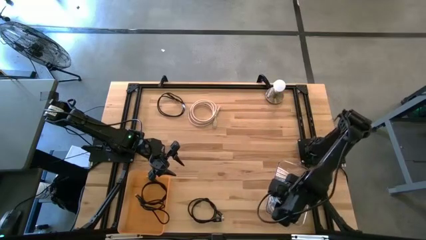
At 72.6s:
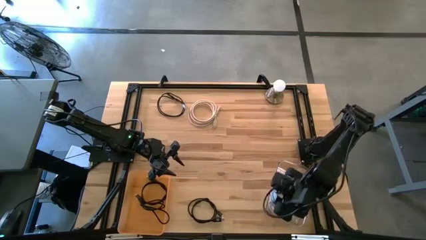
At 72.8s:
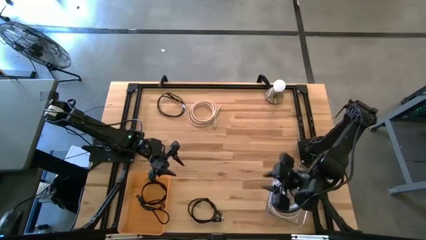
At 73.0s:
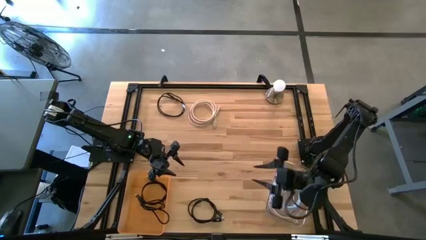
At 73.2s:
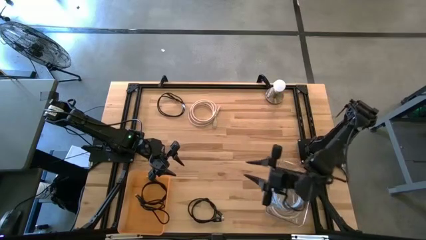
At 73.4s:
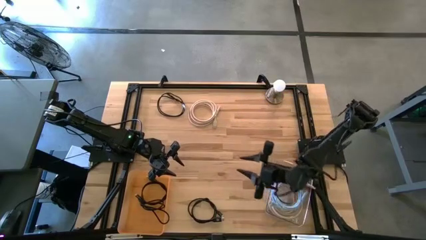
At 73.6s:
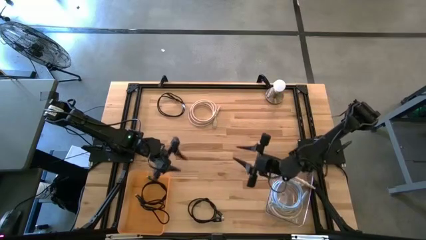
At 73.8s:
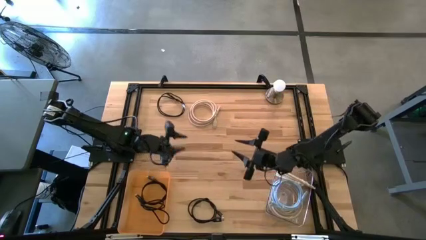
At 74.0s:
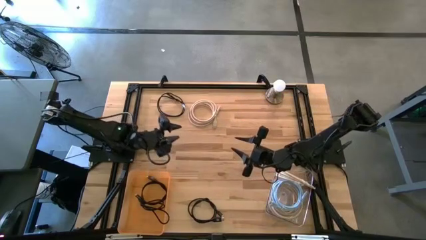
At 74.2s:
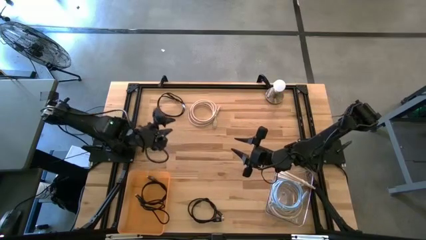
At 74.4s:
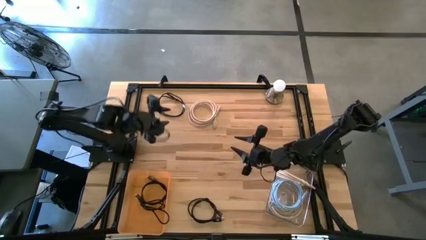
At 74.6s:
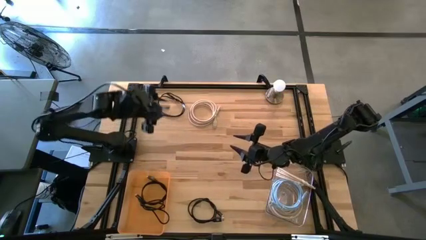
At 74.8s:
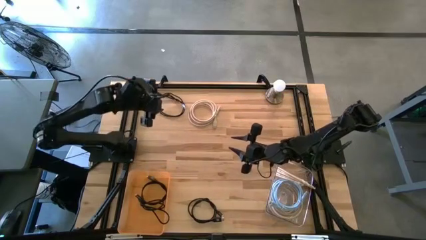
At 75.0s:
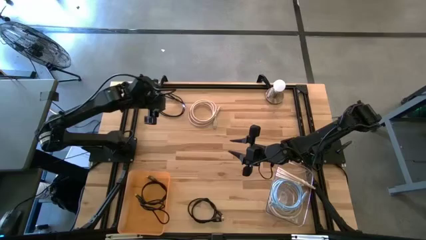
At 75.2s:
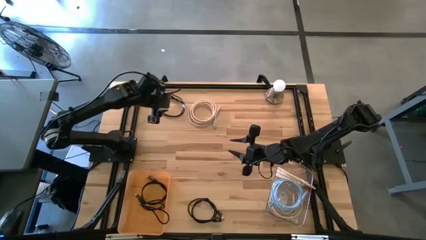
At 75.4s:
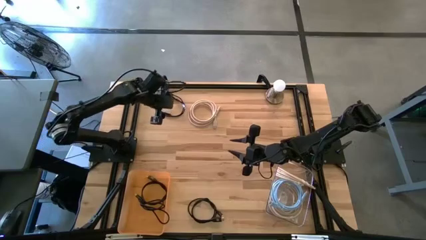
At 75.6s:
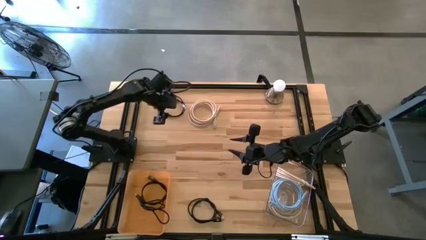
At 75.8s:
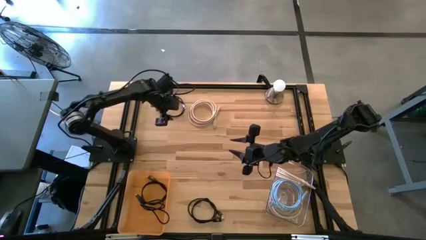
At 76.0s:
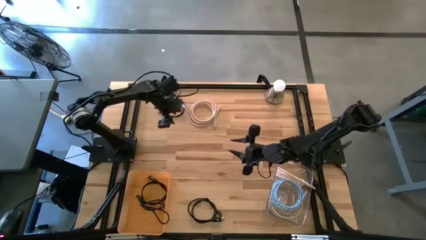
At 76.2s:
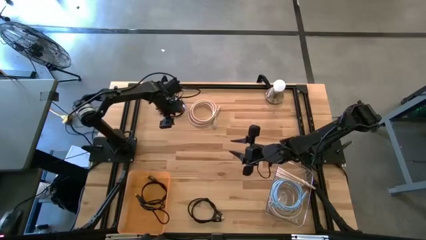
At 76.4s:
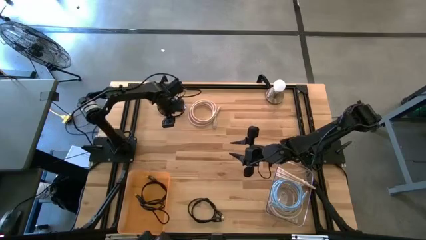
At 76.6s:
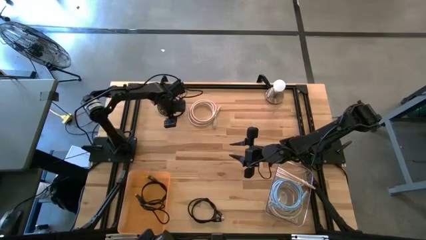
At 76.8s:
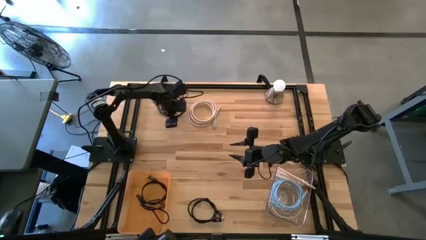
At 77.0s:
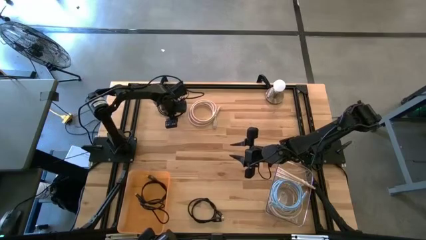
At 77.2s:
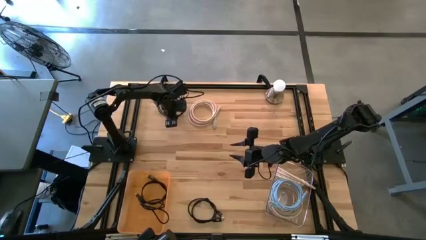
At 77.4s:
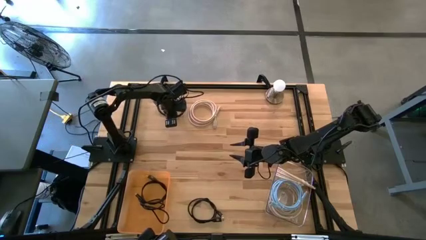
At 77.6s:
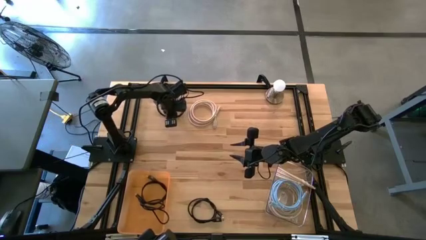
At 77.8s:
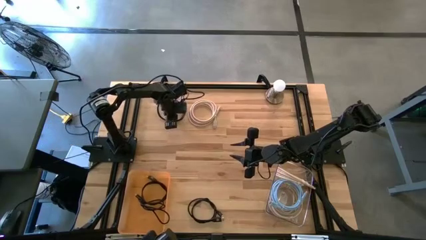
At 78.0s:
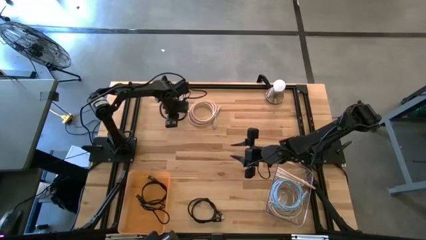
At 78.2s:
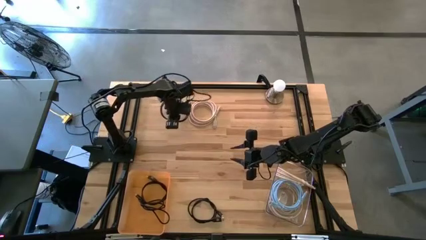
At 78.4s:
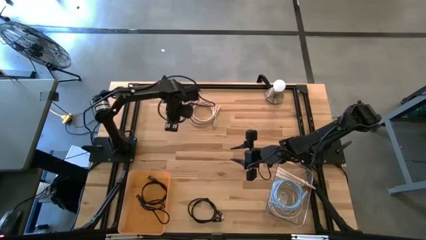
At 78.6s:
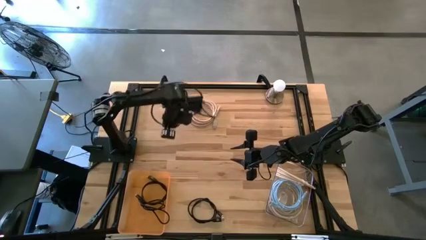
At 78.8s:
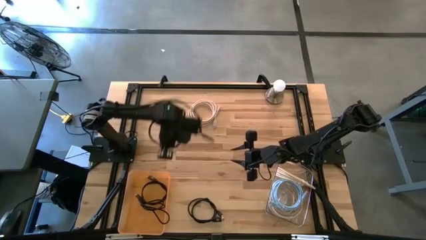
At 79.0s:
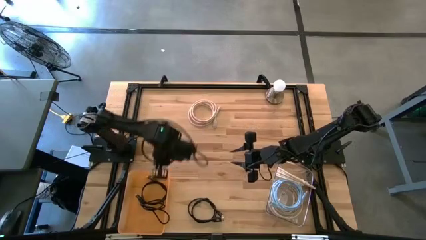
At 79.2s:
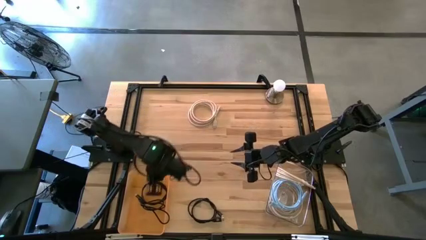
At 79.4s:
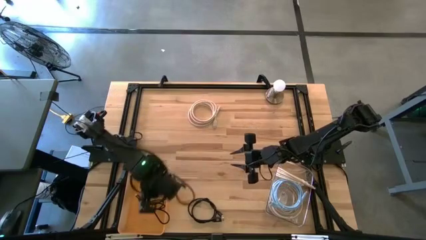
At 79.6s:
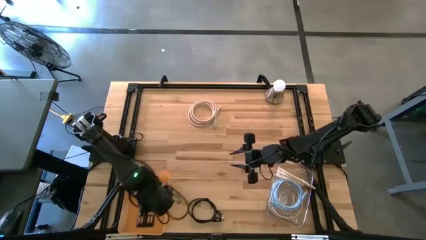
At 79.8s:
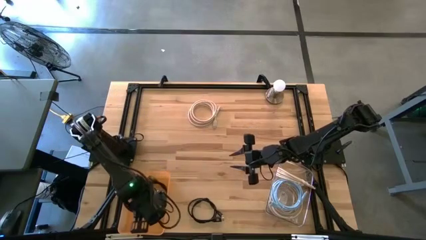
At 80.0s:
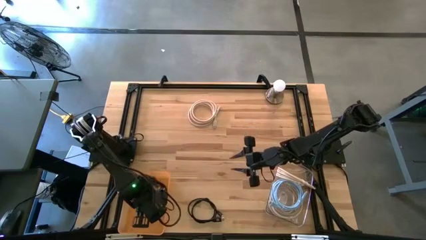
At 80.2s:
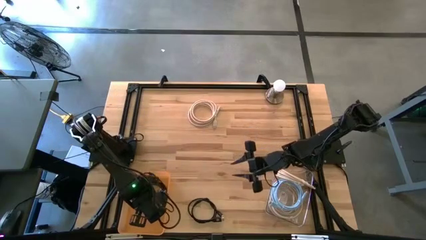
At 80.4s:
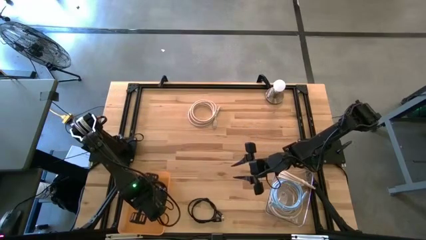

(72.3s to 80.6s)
Task: Sort HDMI cables
Put the black HDMI cable into the orange bin

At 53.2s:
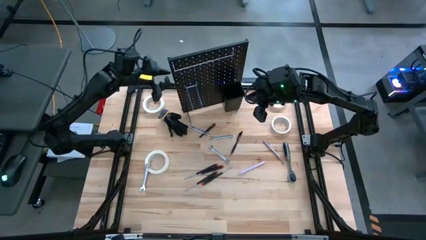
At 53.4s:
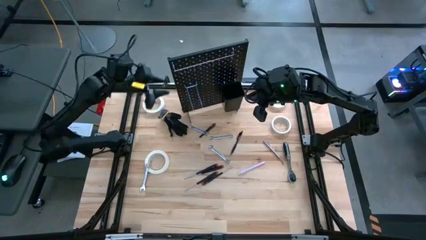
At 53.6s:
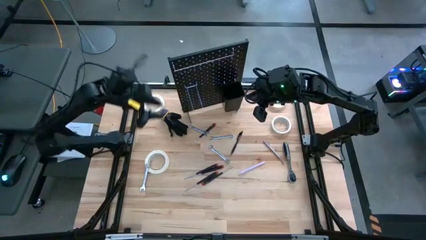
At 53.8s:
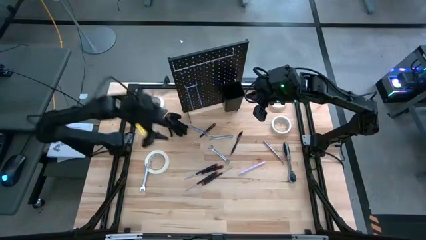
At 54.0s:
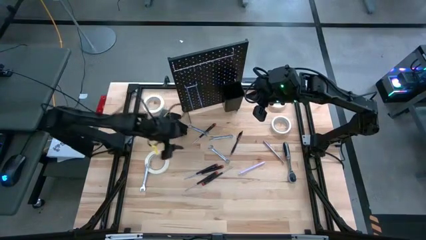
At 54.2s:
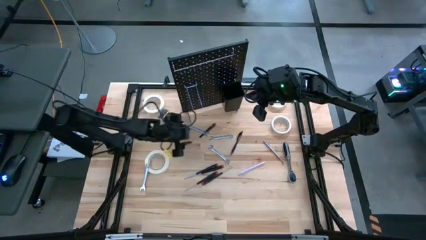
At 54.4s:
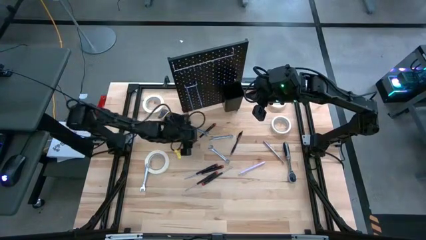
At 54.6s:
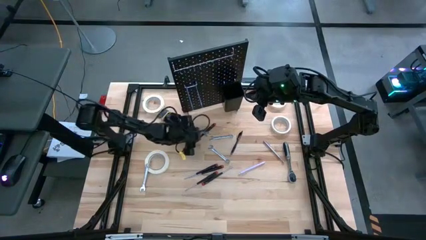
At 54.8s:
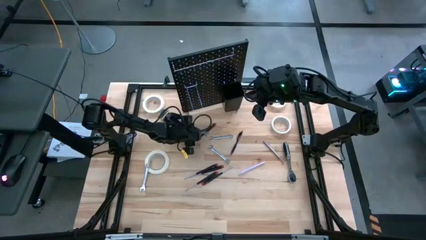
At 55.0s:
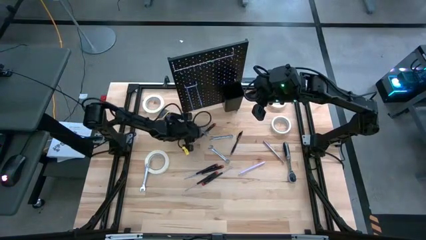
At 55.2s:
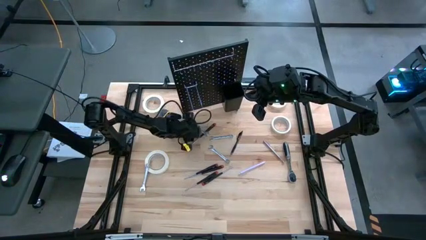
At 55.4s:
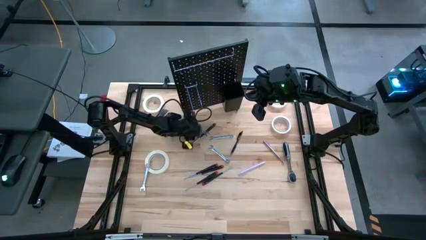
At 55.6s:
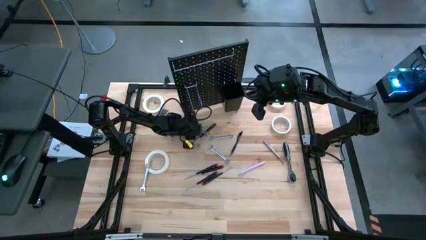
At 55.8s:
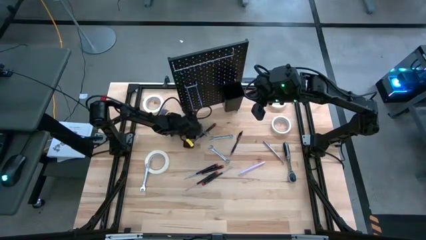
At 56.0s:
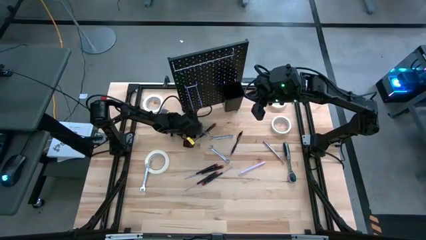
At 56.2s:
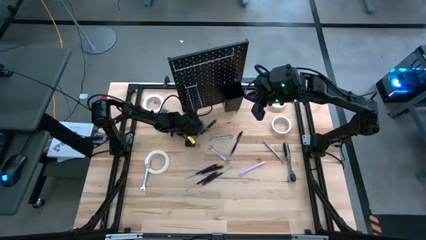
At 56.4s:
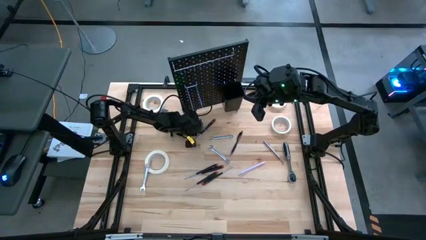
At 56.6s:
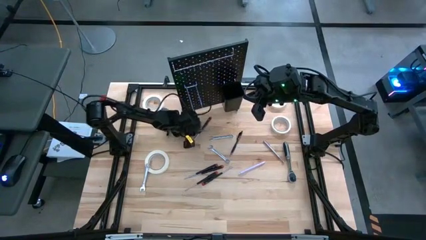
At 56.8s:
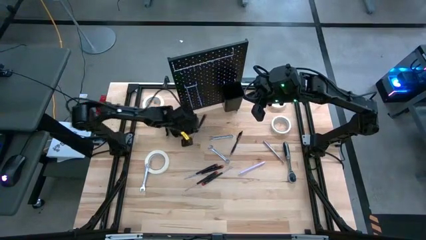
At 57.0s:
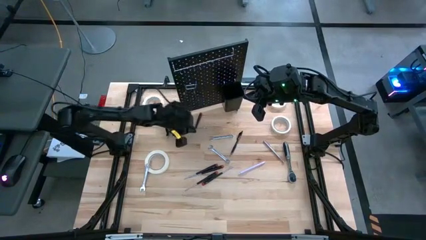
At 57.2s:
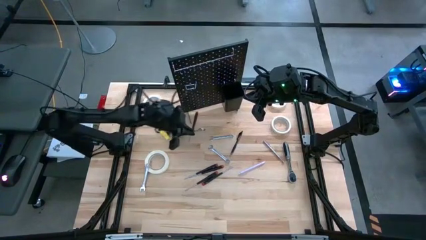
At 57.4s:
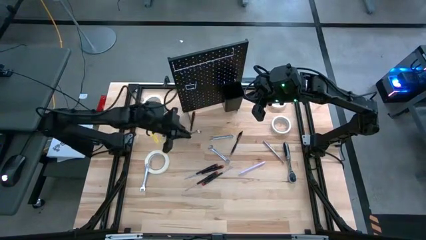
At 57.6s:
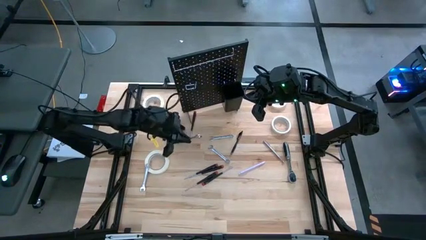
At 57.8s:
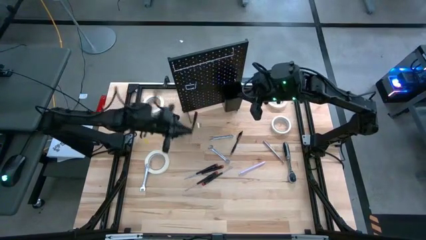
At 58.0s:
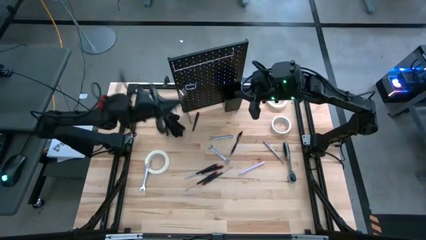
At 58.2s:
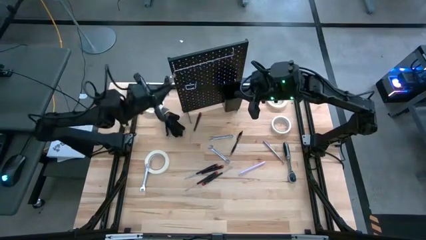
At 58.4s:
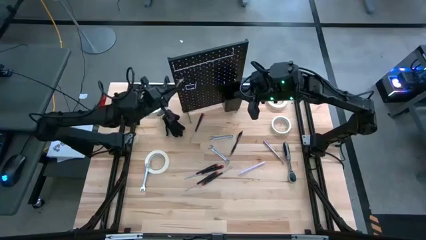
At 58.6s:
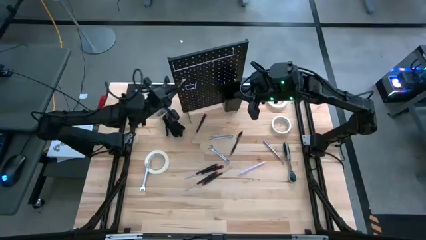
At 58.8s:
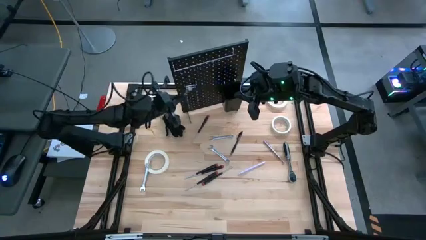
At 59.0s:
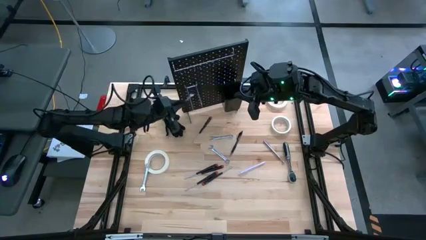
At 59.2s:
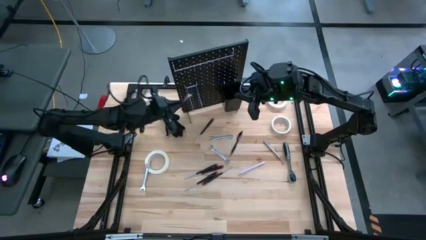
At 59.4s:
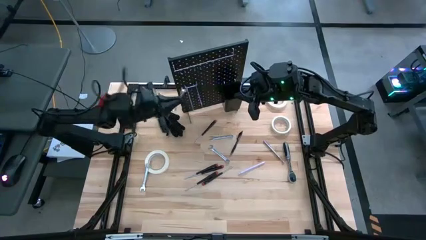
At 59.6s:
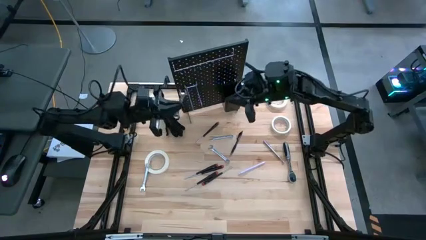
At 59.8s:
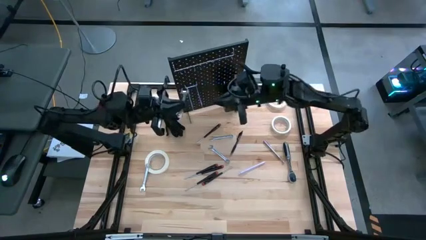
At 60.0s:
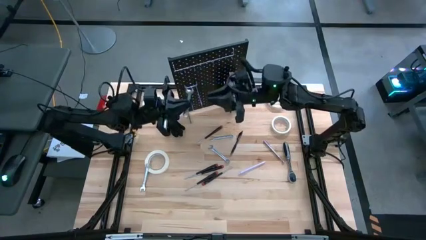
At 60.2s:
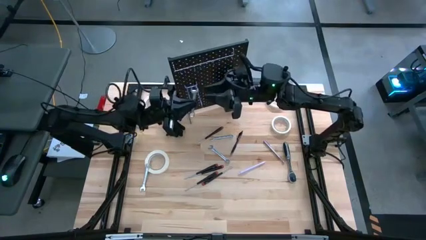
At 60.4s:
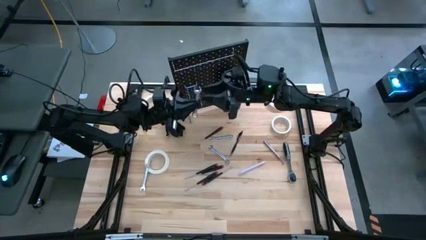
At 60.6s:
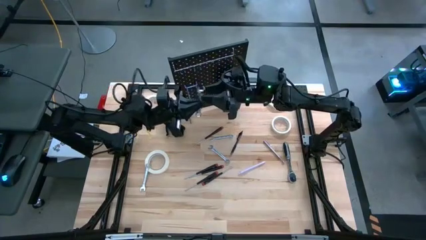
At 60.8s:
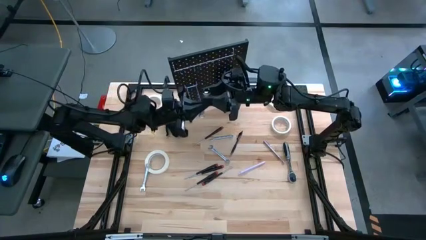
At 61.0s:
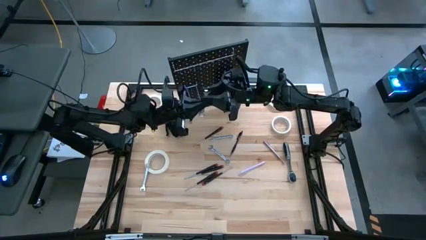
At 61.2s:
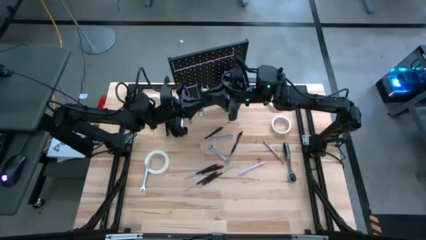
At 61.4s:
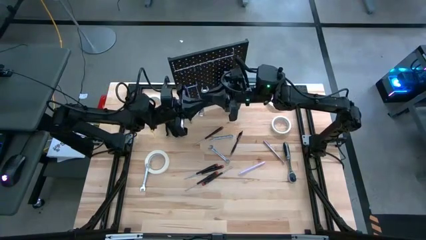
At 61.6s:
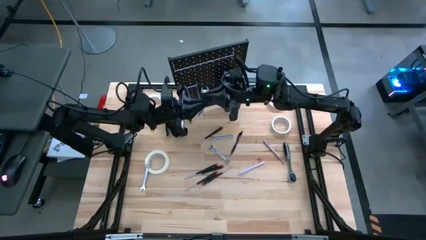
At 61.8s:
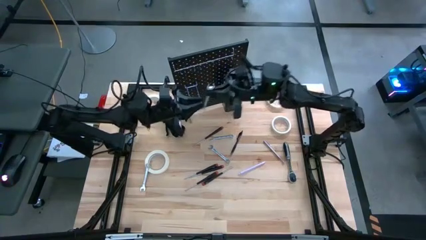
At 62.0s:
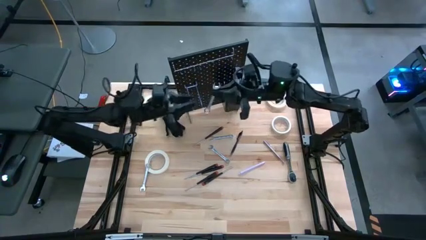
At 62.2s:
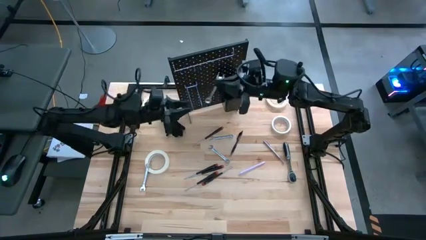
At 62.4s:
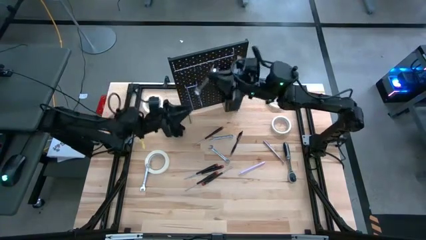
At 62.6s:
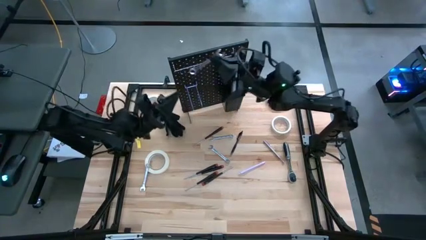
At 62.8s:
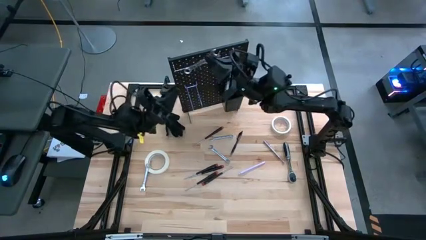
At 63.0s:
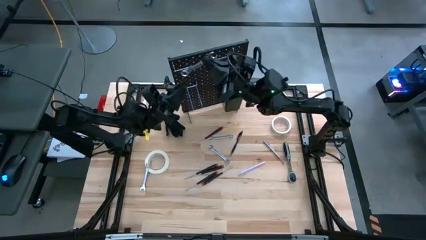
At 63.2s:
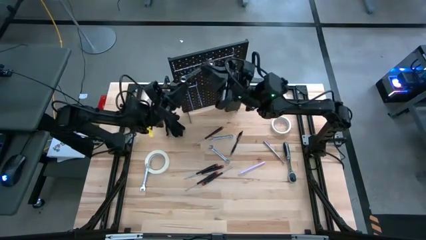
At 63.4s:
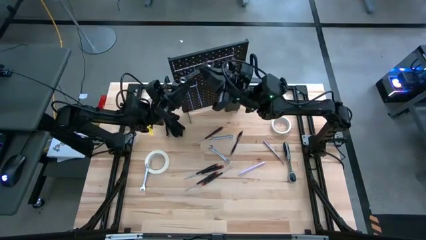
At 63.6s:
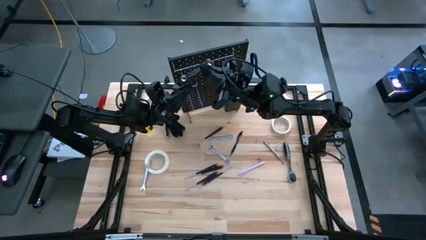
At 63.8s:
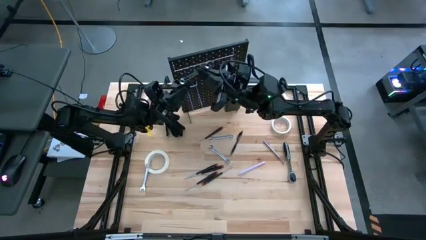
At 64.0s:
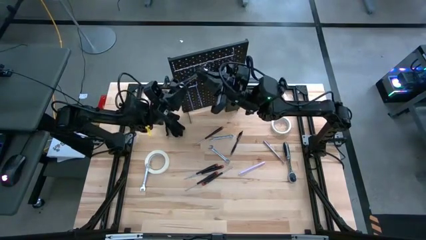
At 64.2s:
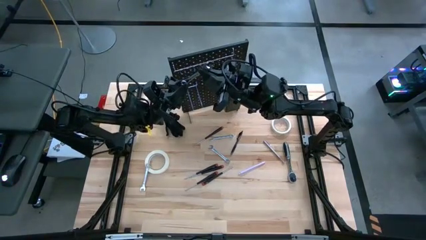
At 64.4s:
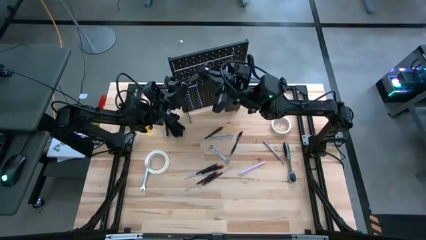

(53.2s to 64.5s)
Task: Hang tools onto peg board
Hang the silver wrench on the peg board
